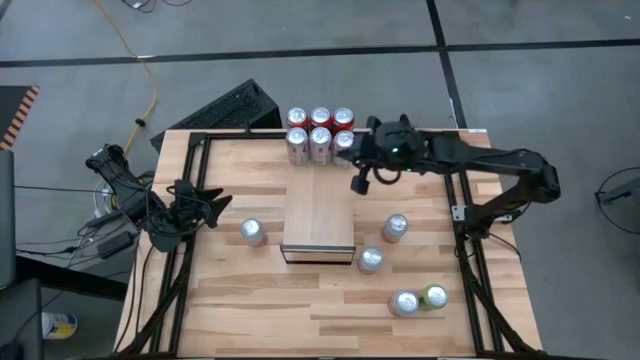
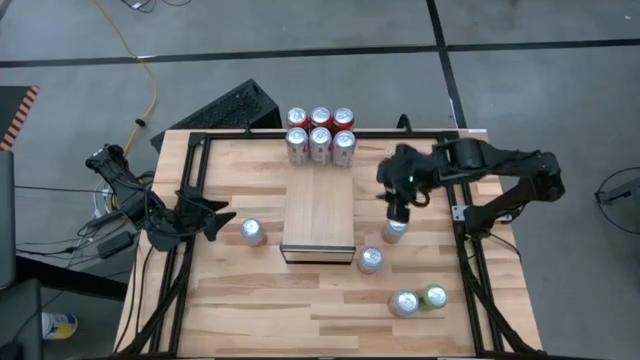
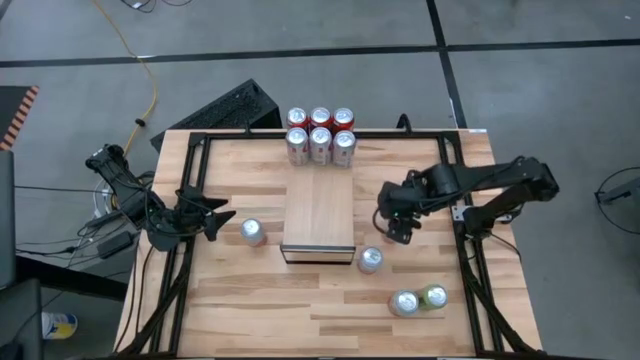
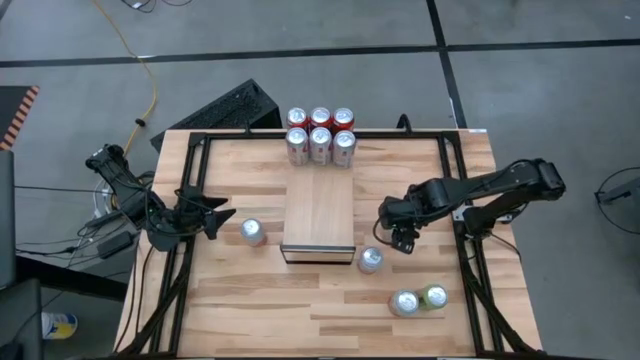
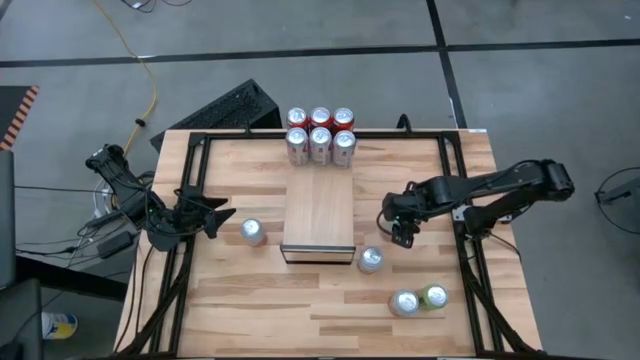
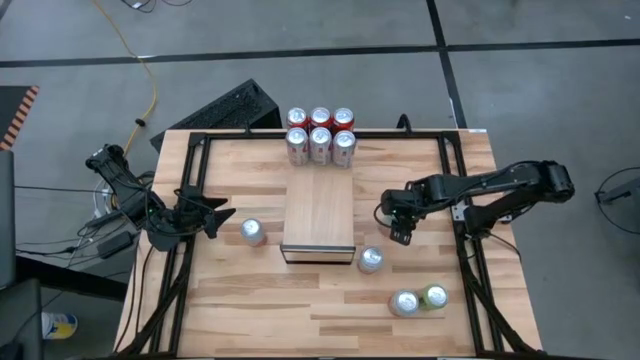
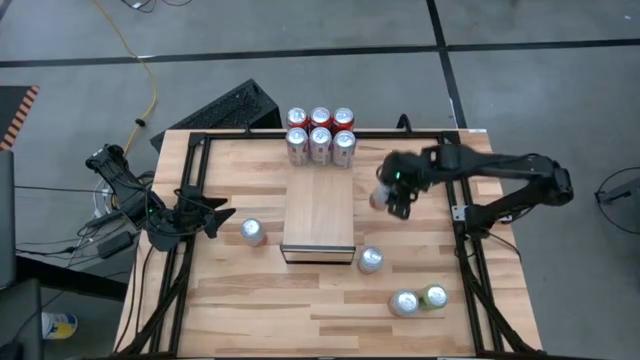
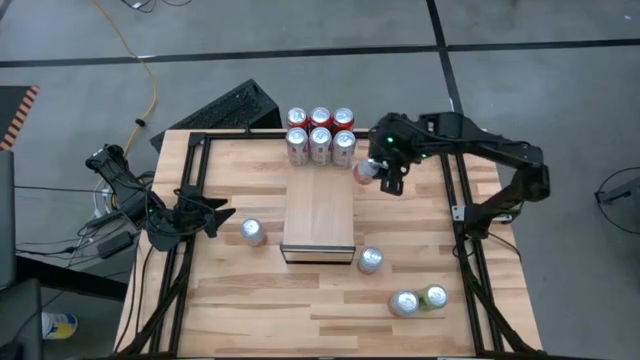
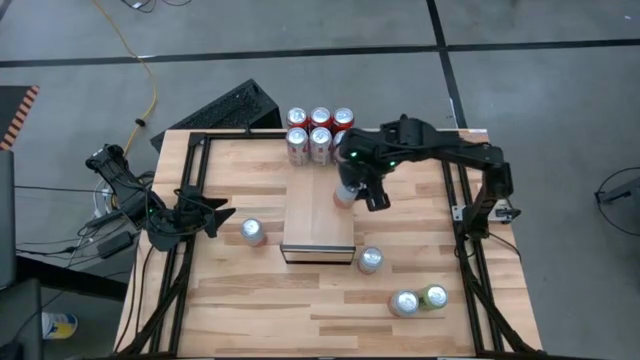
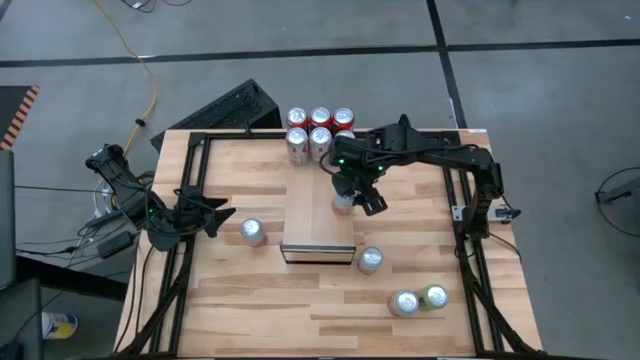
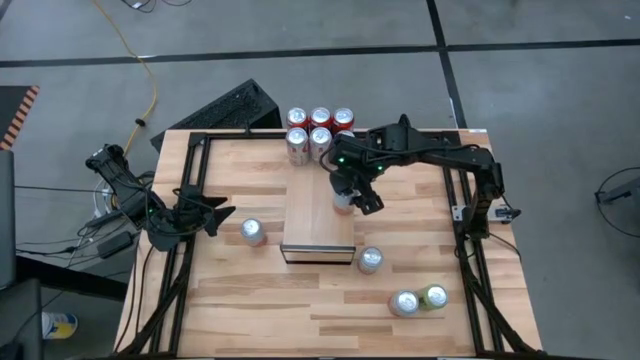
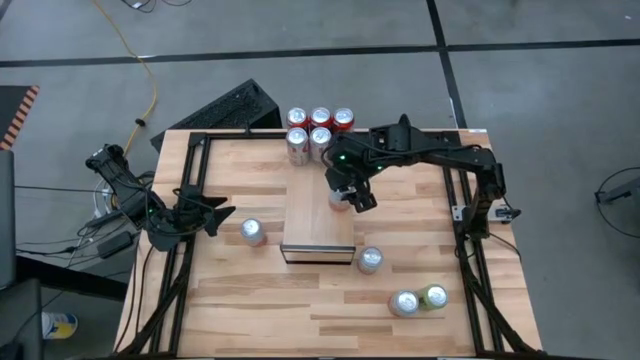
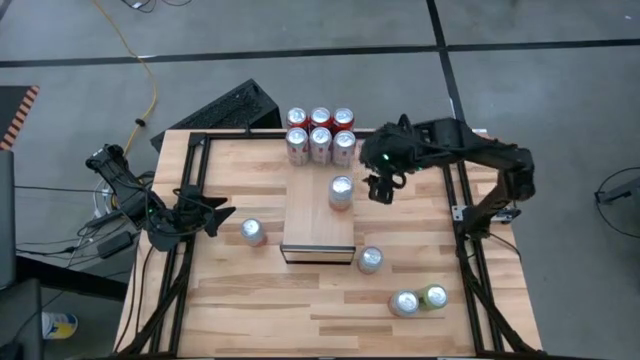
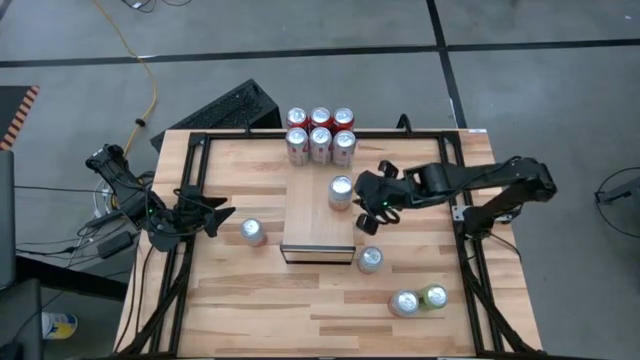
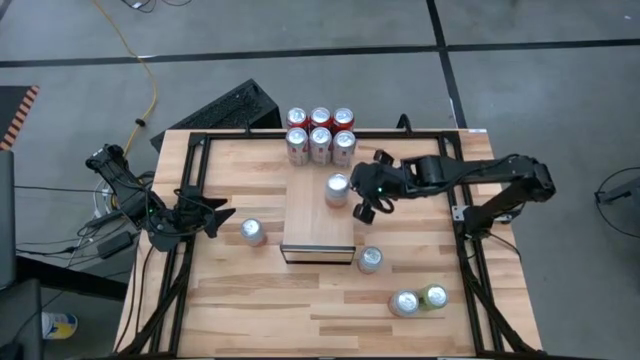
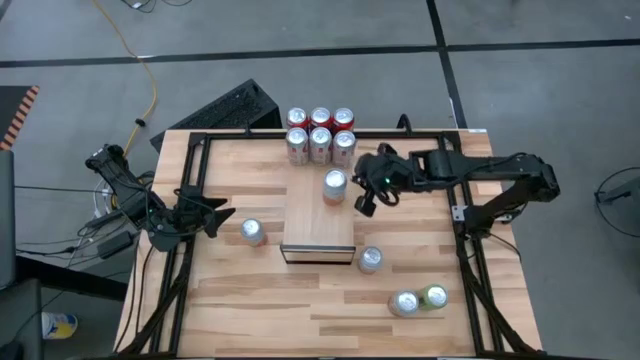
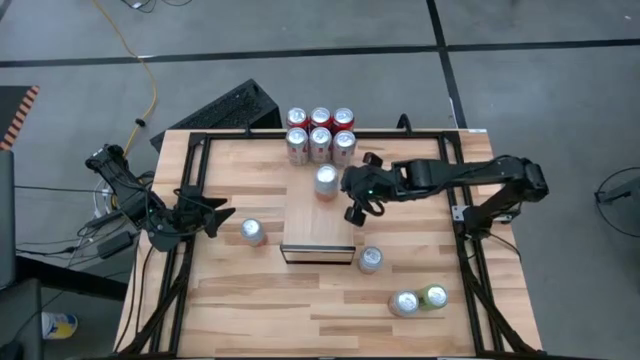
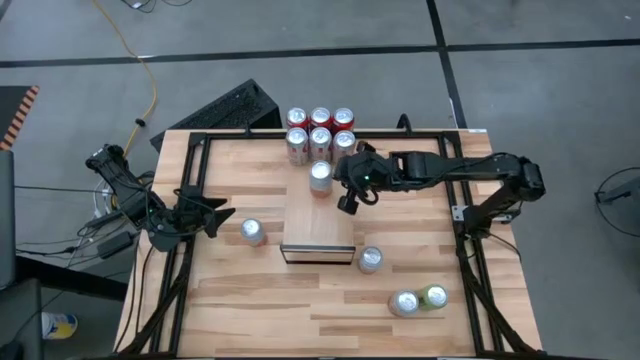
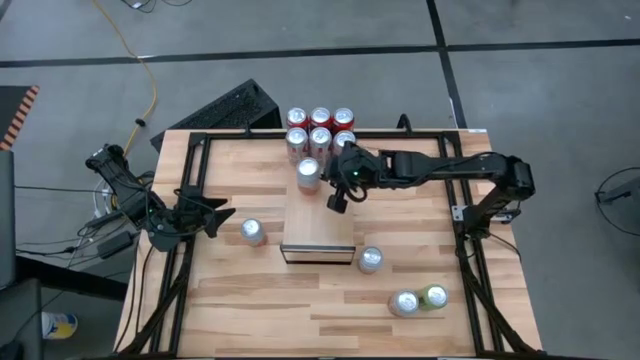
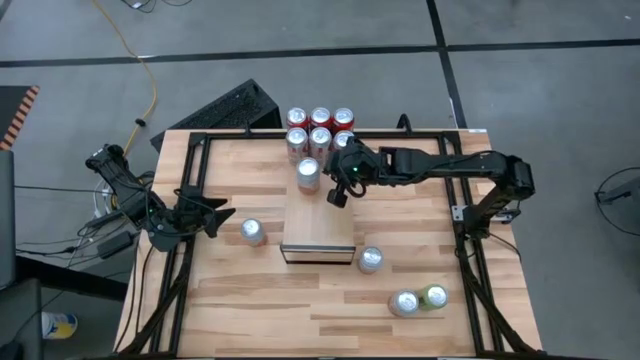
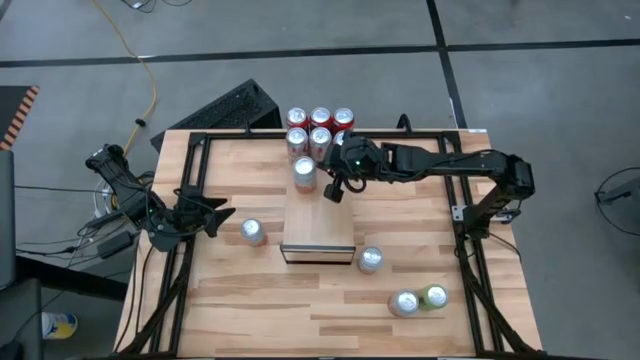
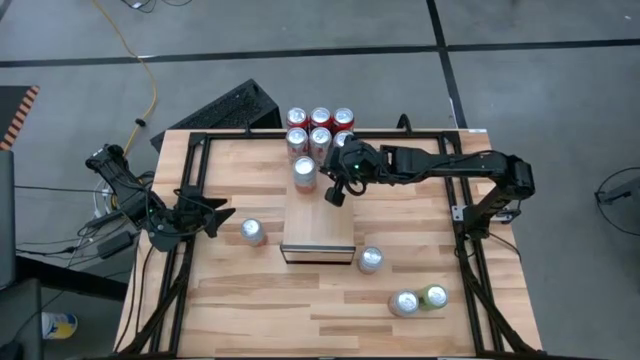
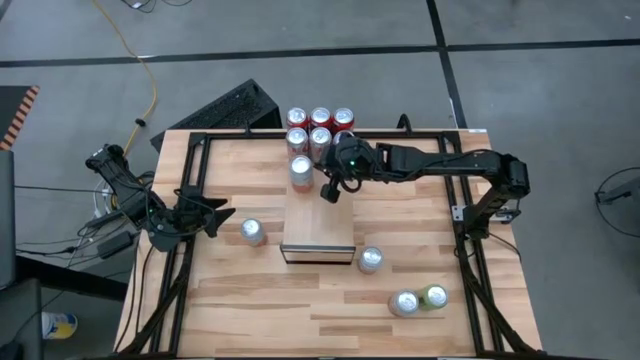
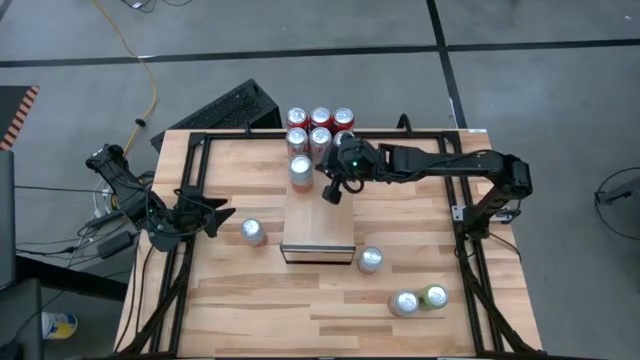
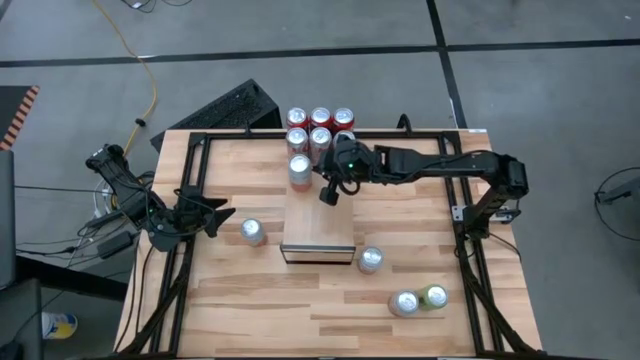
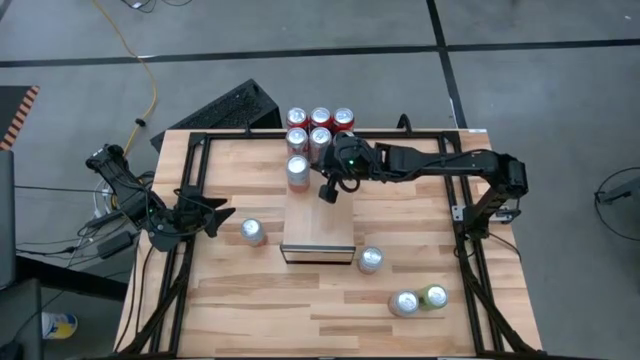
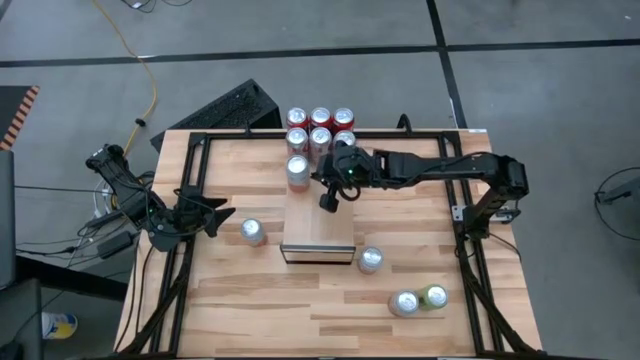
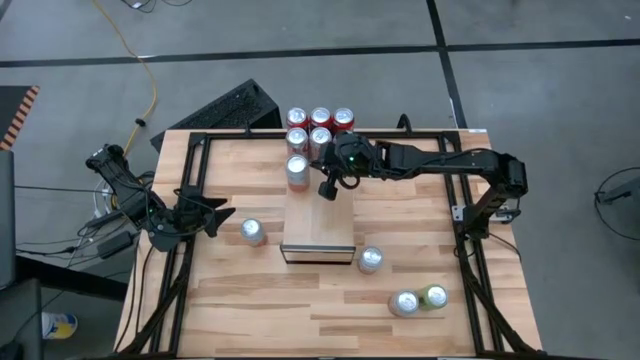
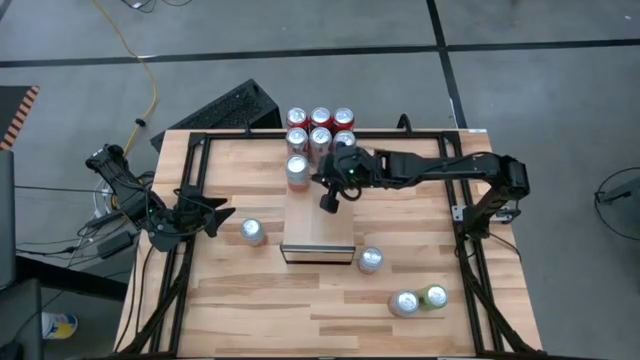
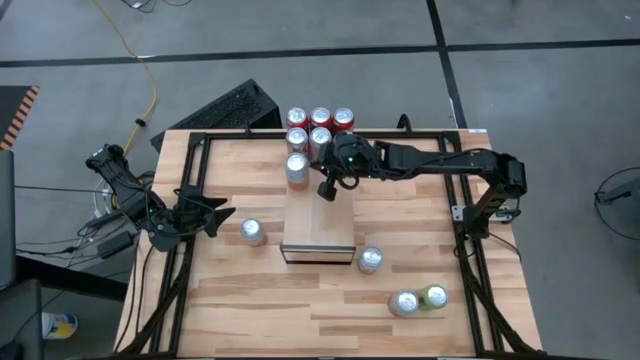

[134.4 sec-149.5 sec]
Task: Place canned beverage on shelf
Put the top right orange-white soda can on the shelf

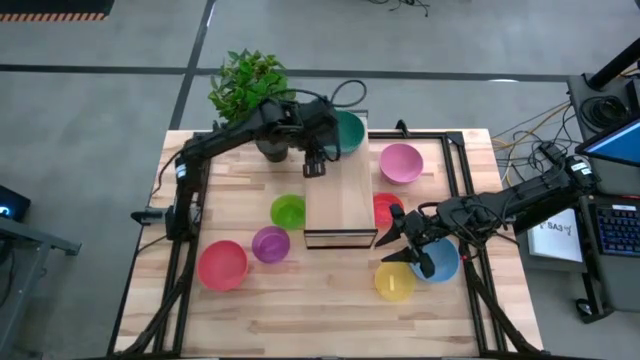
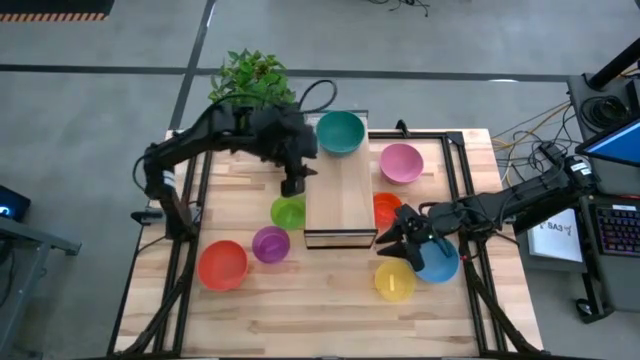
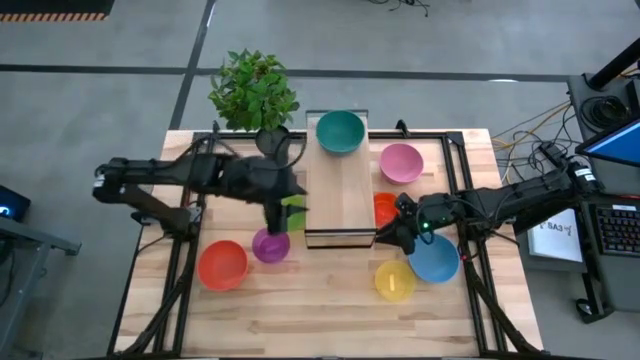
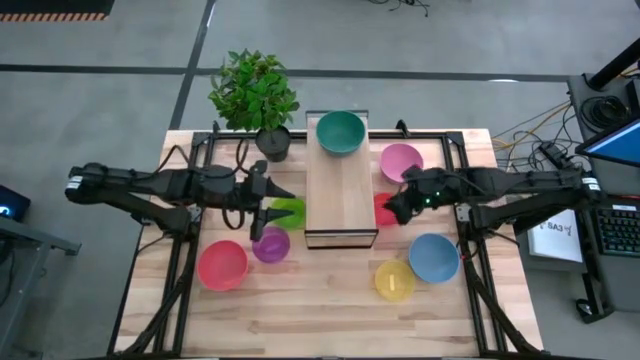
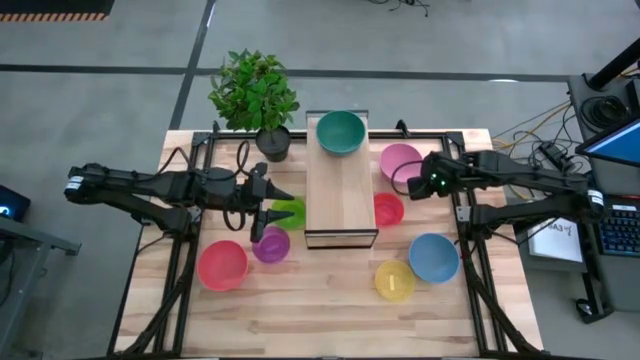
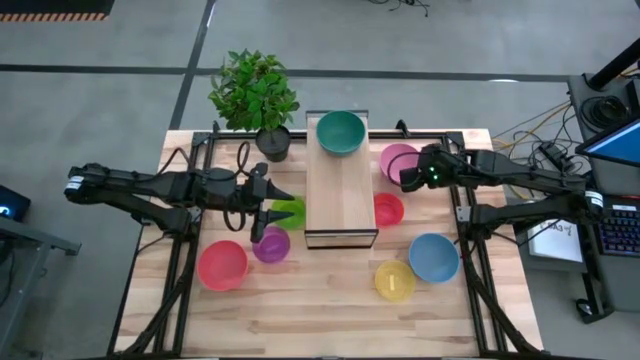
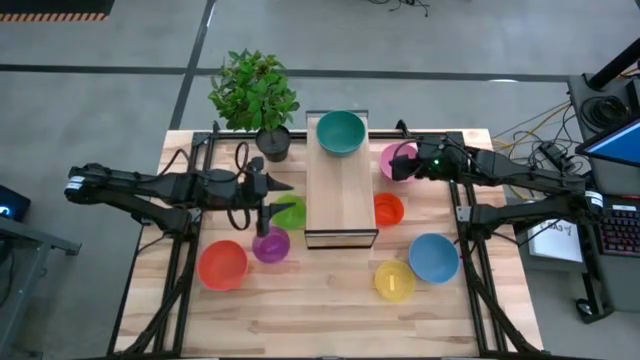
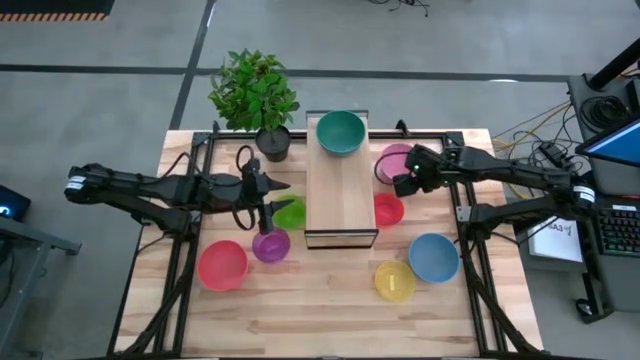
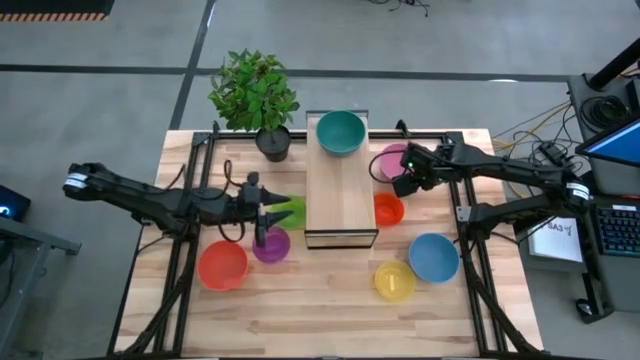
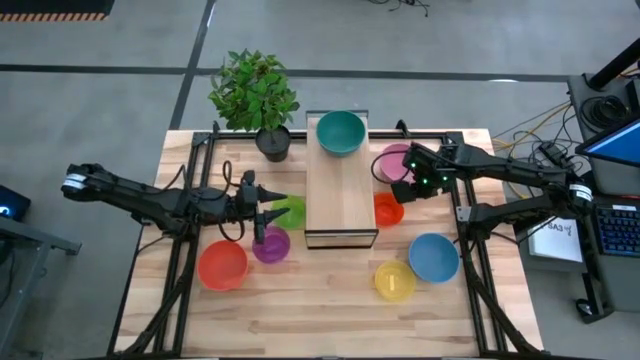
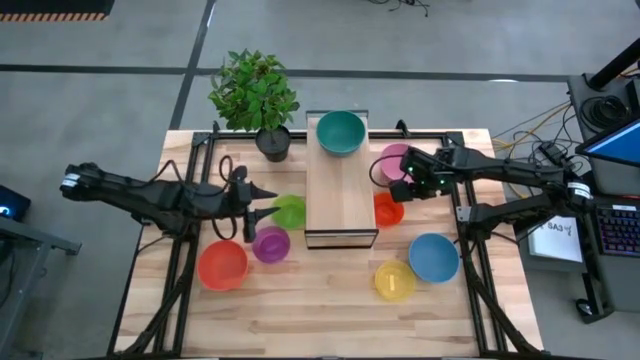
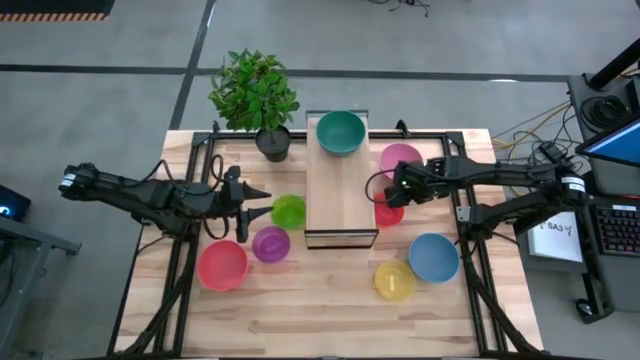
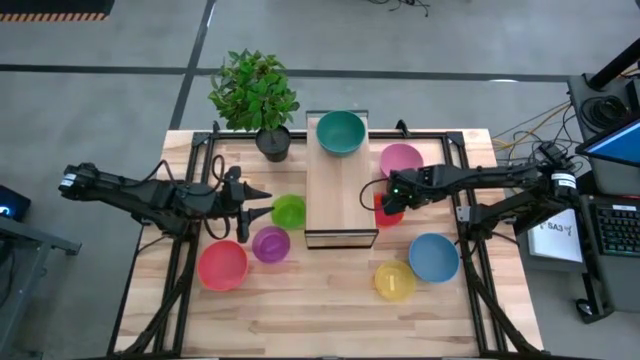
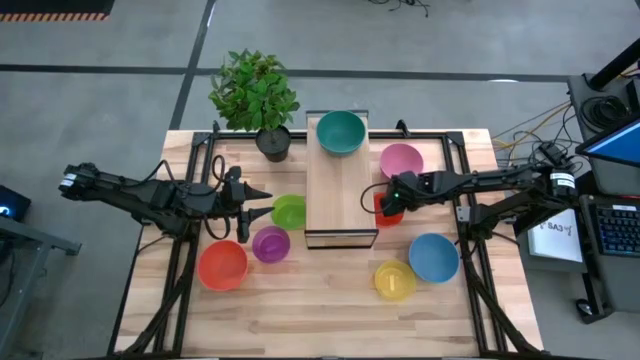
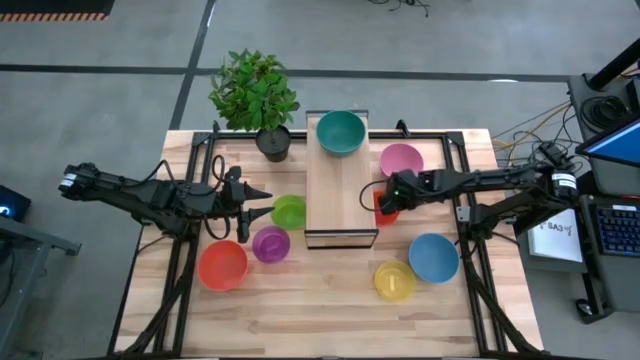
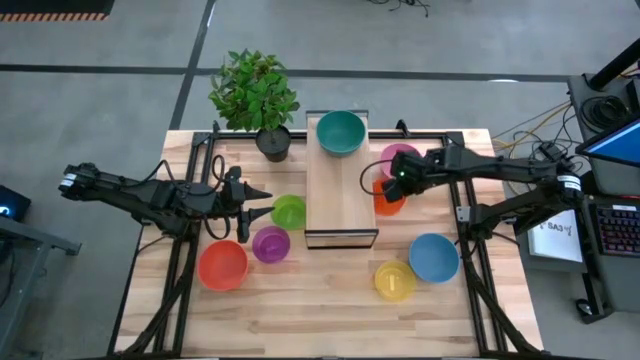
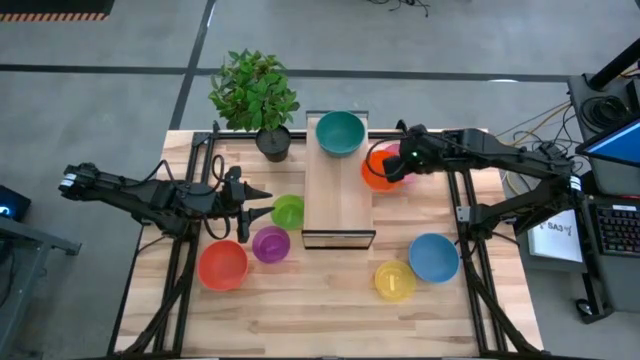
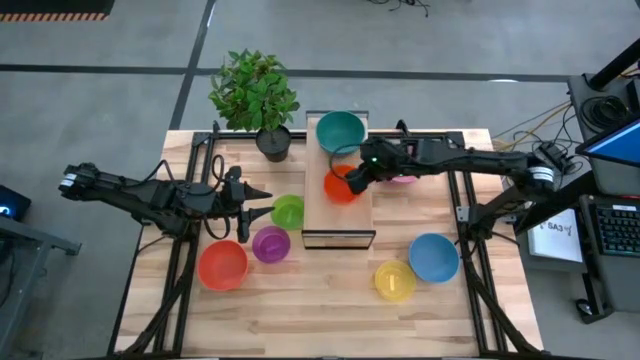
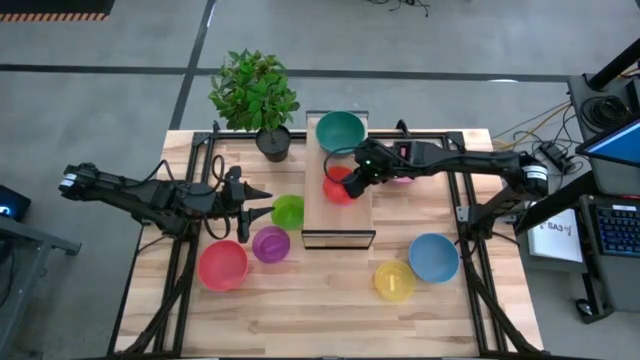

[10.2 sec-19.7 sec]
Task: Place and stack bowls onto a shelf
Put the orange transparent bowl onto the shelf
